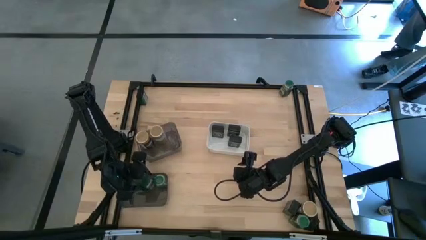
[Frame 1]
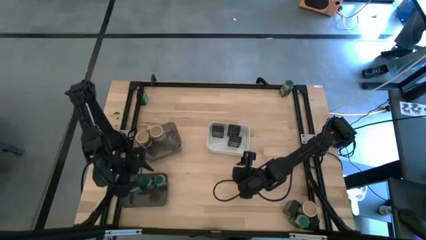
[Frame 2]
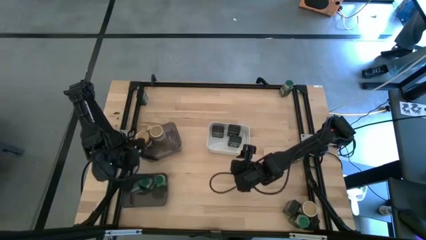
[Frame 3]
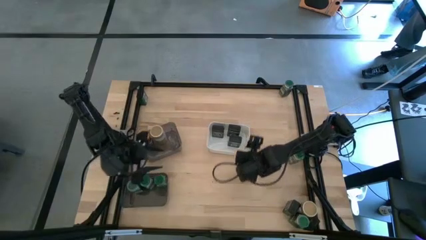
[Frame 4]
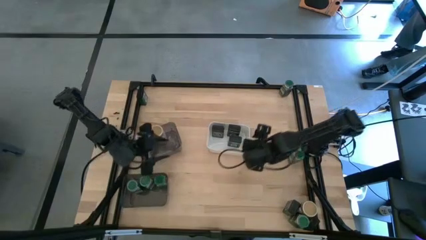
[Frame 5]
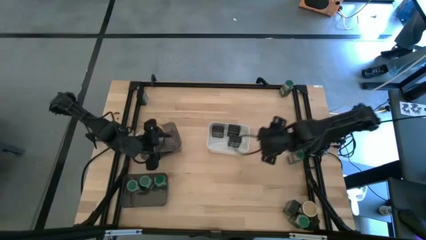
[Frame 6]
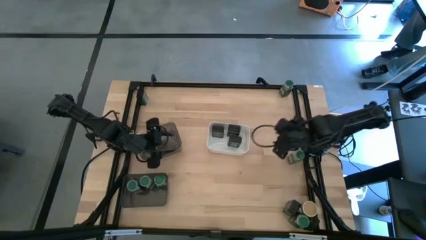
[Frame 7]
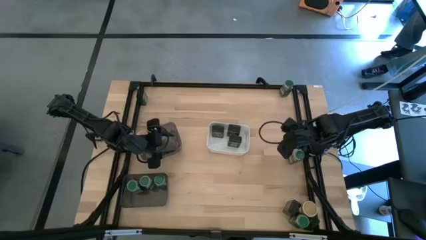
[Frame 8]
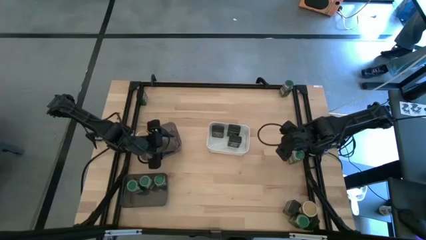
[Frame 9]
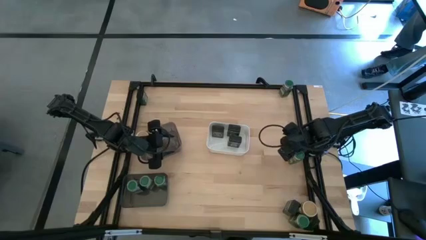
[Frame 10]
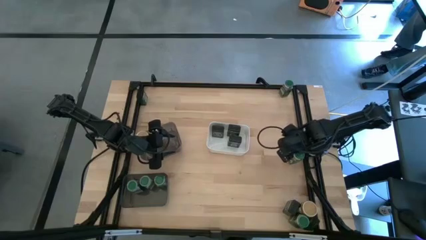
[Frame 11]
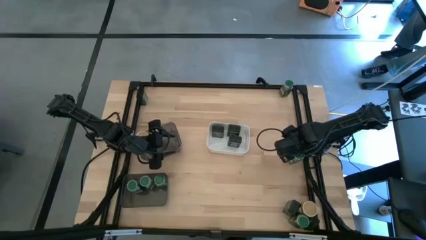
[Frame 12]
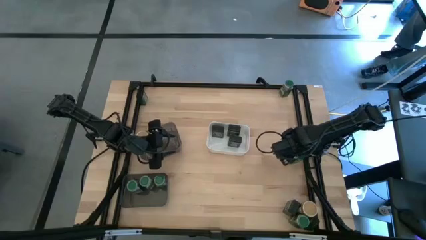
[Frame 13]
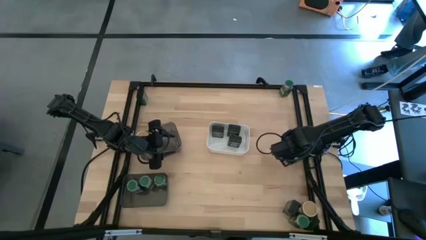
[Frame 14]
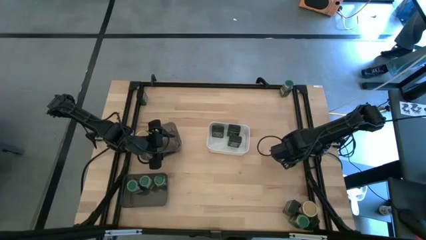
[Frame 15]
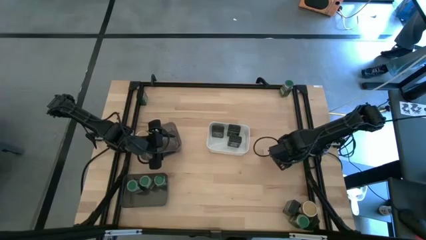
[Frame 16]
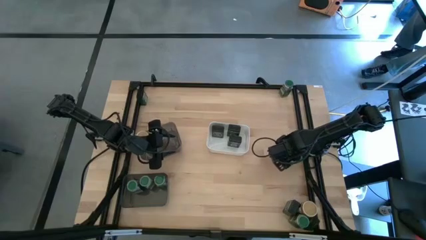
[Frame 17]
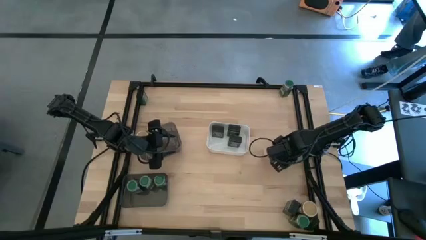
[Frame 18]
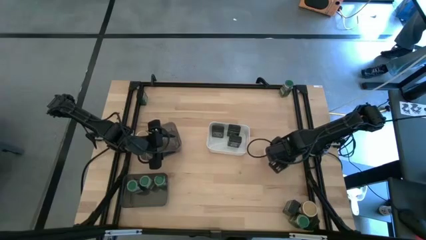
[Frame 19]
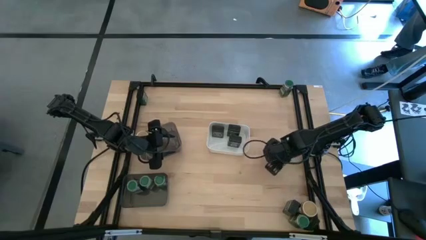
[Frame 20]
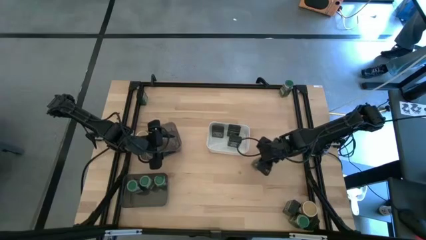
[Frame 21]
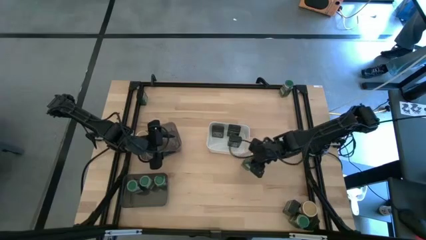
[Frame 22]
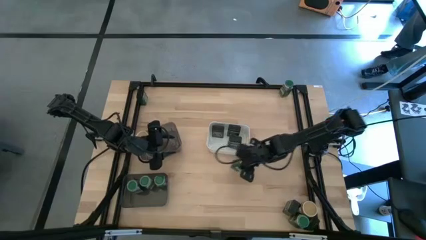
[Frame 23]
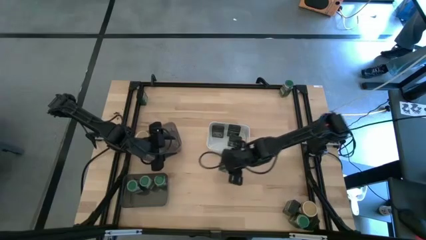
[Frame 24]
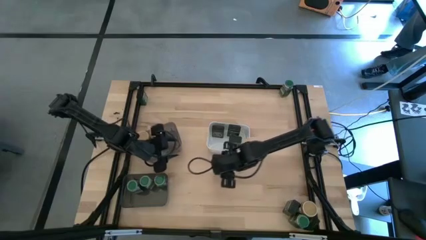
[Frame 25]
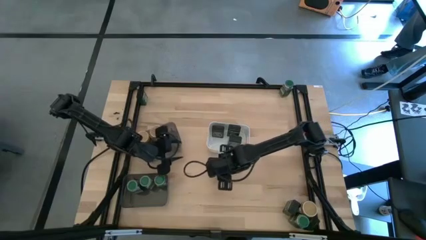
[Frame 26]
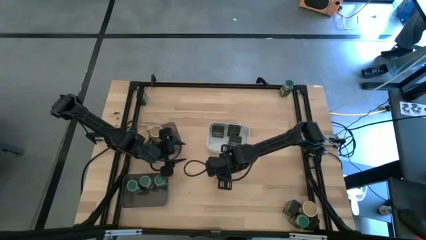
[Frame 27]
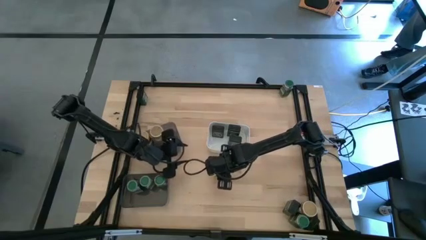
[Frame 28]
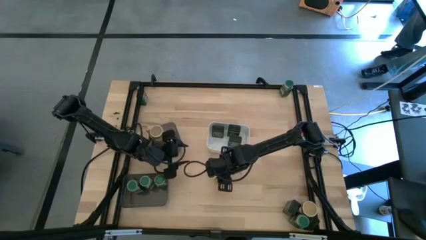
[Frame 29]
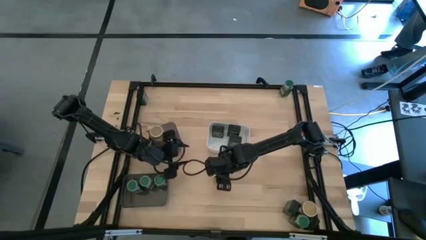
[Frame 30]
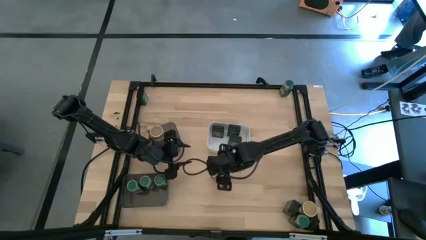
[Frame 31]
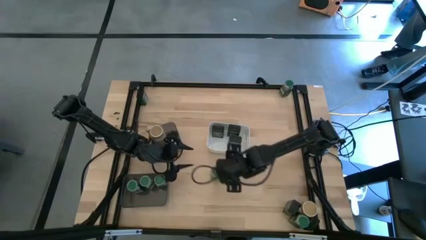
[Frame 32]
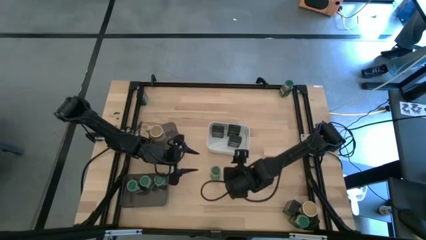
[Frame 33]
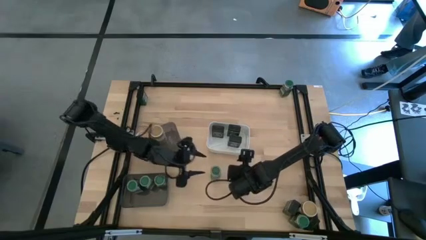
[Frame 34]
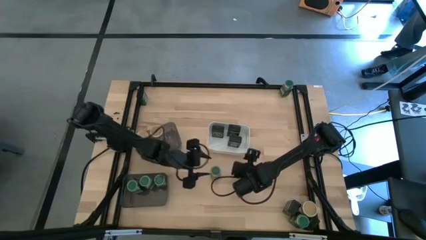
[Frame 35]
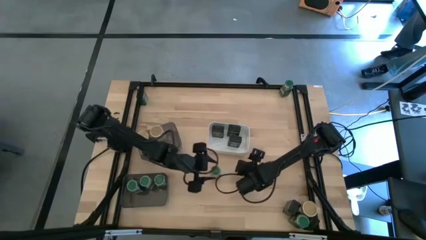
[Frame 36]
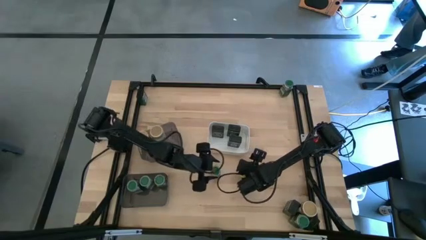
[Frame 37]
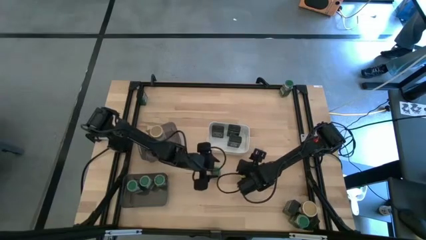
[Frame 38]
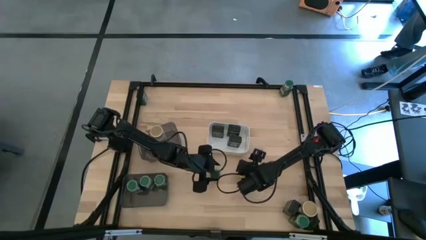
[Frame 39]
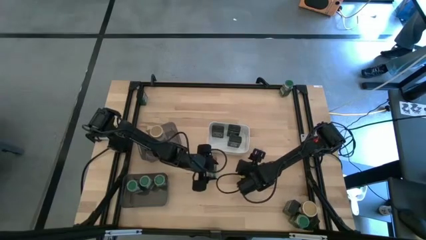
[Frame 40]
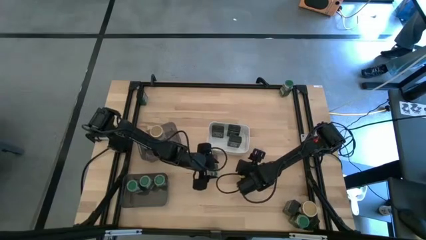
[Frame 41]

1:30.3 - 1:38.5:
Task: Sort spices by type
Put the green seasoning bottle into the bottom black bin

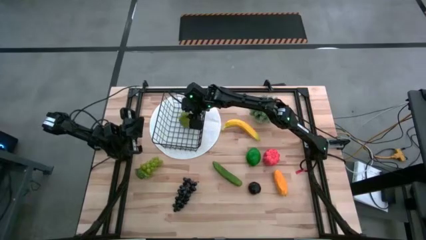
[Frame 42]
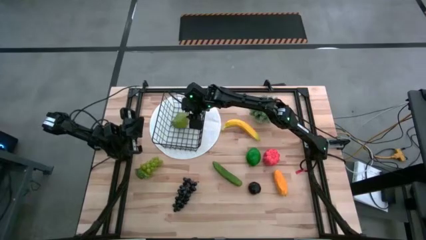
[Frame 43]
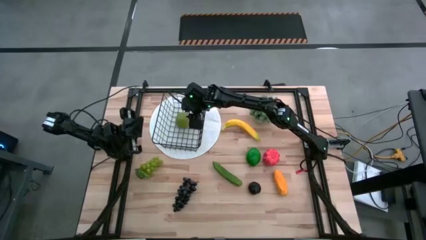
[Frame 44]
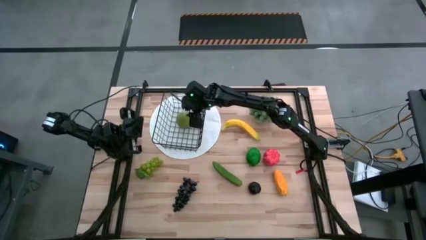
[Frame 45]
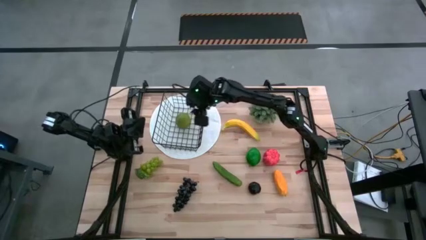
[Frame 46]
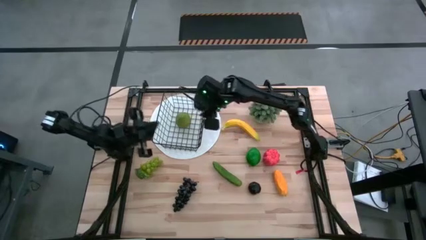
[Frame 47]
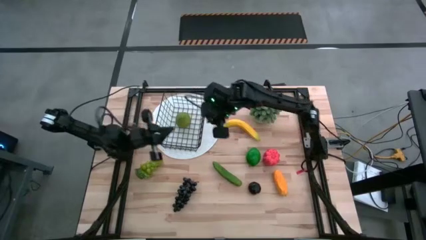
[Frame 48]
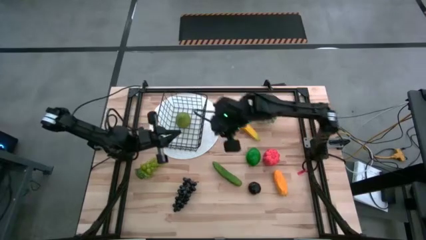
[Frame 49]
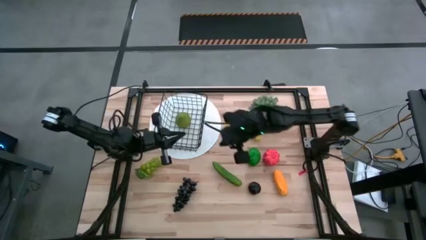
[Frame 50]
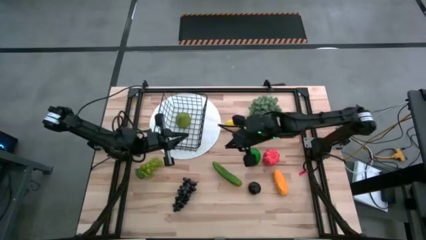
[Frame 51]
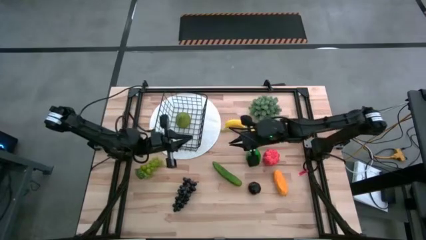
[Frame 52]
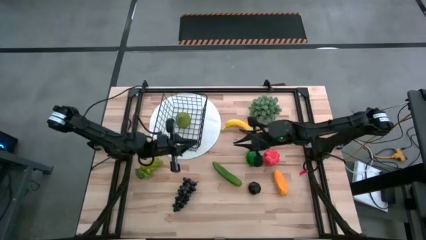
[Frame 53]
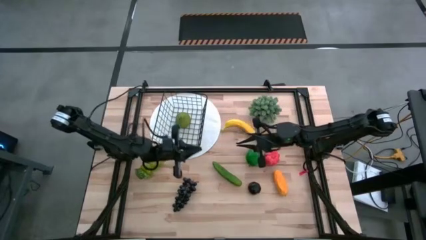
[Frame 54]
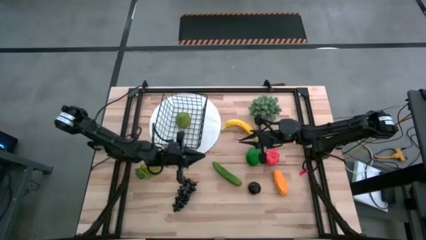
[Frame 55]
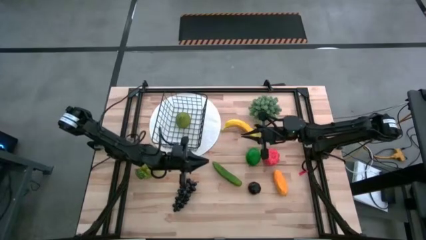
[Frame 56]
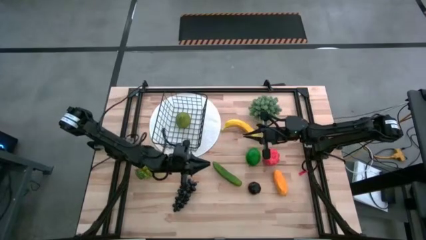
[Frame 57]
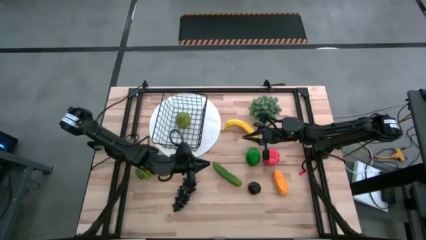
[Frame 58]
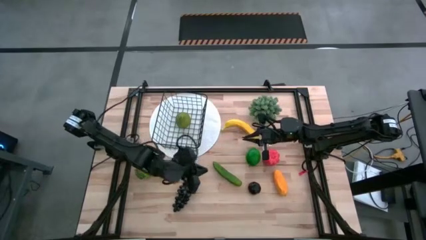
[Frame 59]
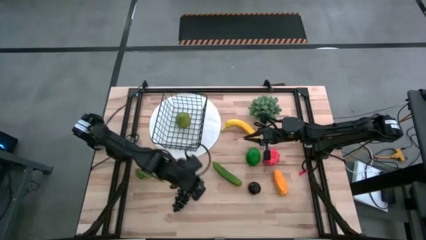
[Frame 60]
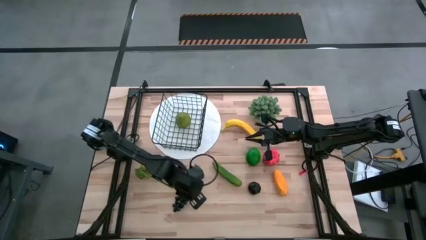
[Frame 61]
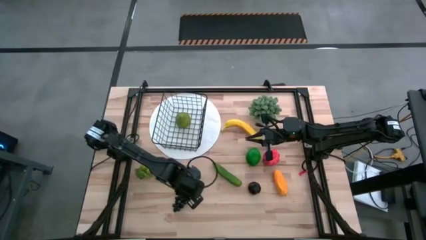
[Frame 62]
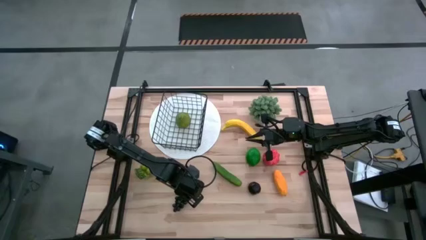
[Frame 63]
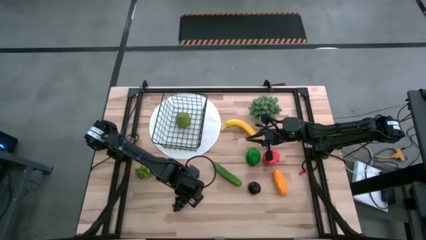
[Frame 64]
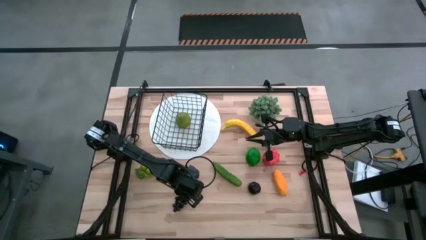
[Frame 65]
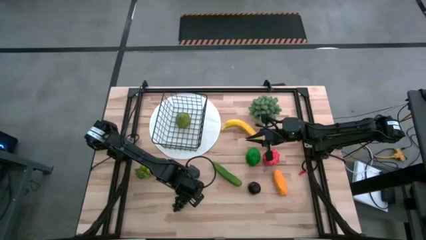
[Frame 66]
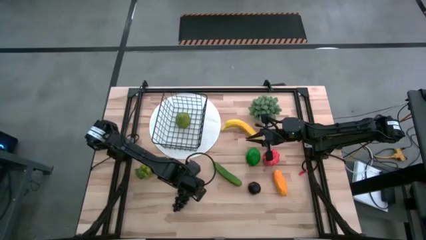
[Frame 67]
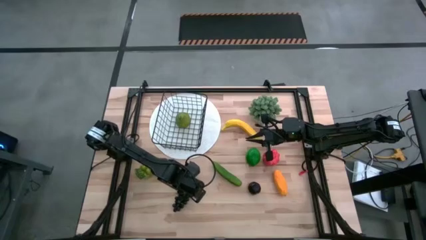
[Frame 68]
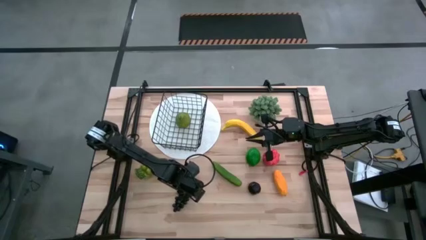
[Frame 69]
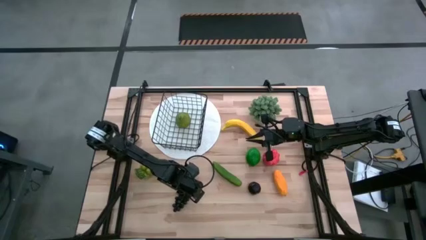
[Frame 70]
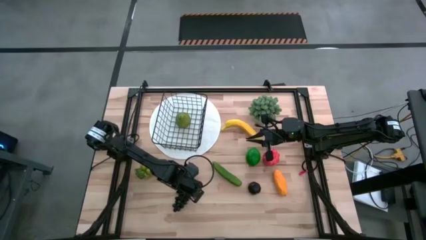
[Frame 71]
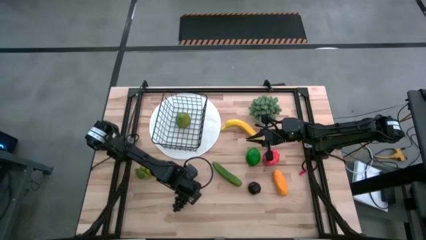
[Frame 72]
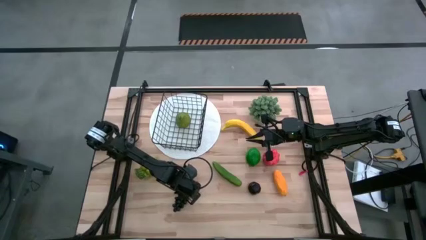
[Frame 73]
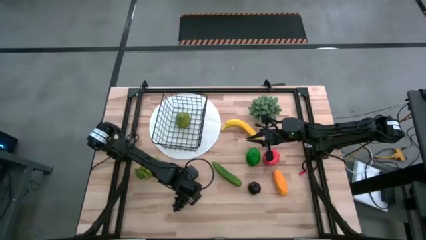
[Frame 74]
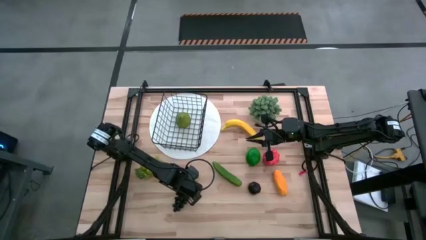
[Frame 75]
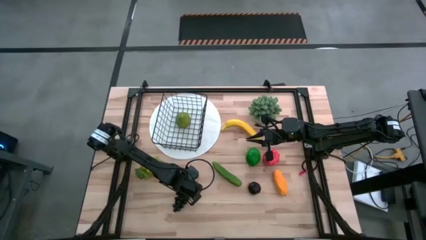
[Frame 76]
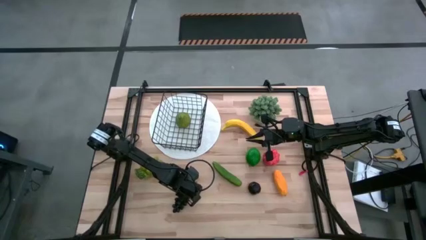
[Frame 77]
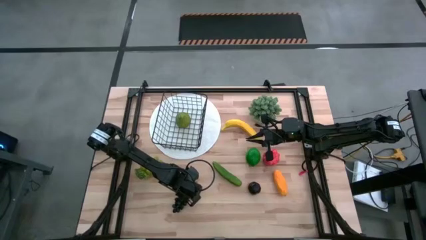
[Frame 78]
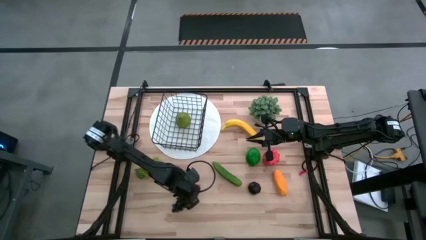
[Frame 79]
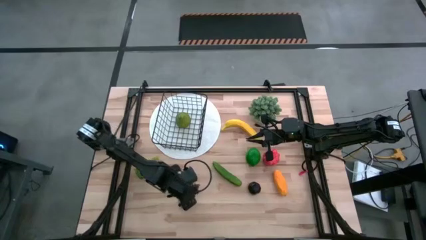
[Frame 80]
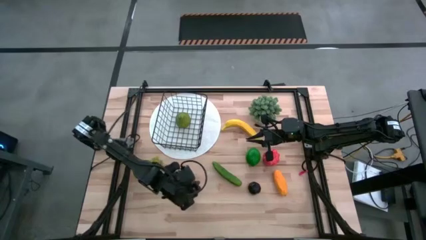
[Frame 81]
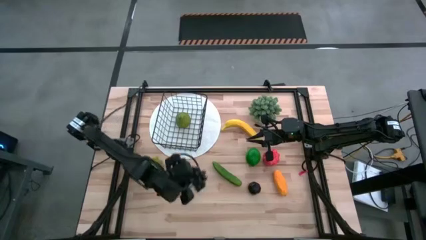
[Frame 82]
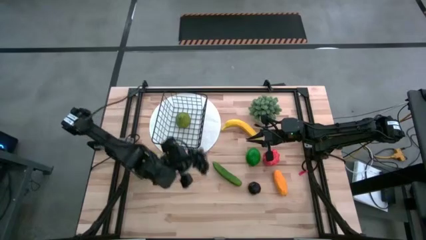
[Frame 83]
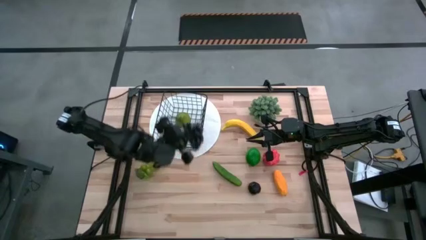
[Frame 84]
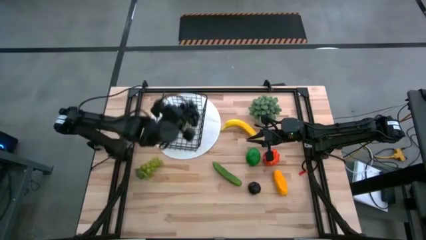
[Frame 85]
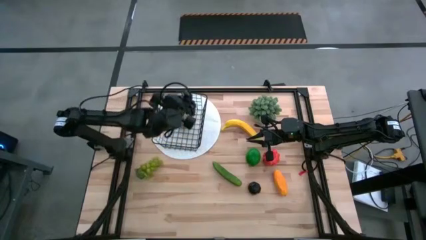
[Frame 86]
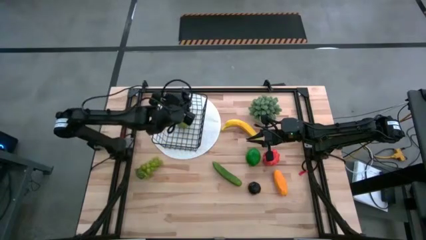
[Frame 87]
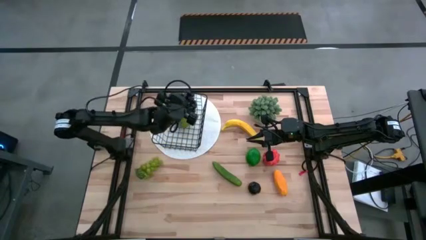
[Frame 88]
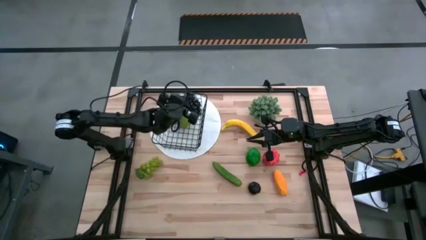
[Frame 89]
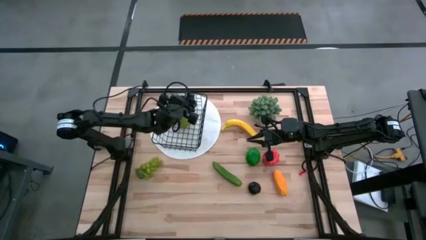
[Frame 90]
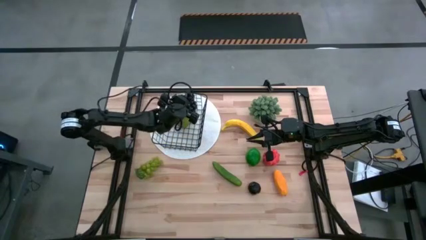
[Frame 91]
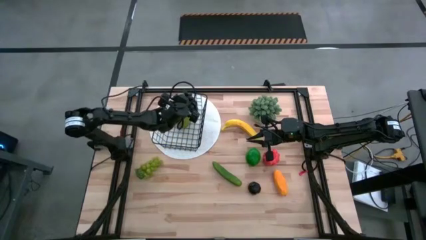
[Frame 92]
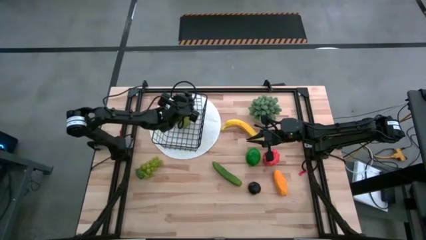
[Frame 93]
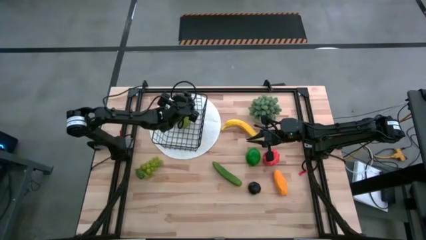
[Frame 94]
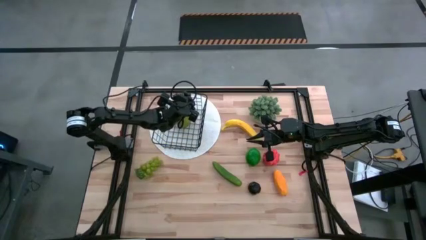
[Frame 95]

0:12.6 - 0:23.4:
Task: Build produce basket
Put the black grapes into the wire basket
